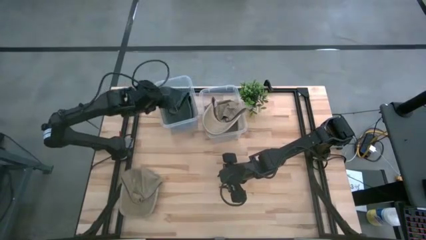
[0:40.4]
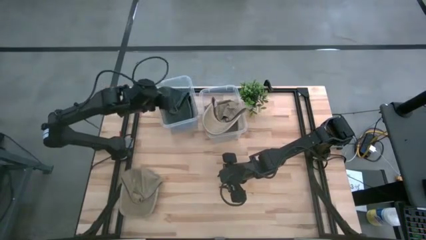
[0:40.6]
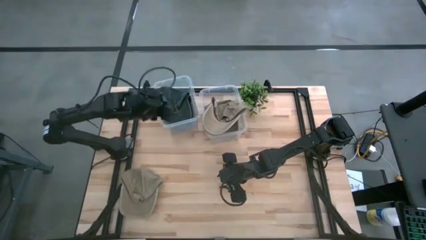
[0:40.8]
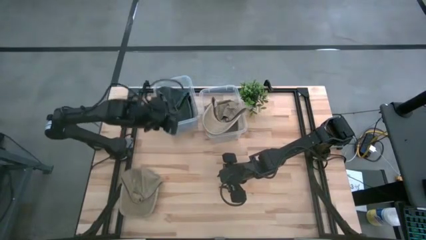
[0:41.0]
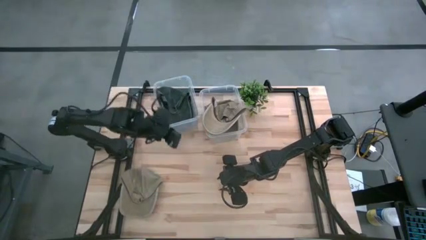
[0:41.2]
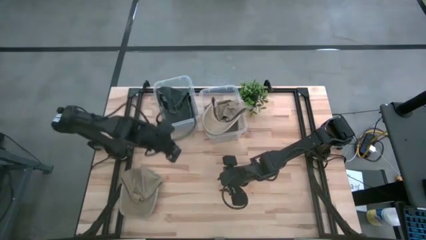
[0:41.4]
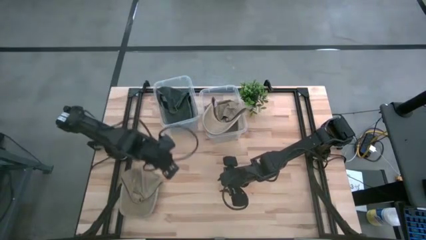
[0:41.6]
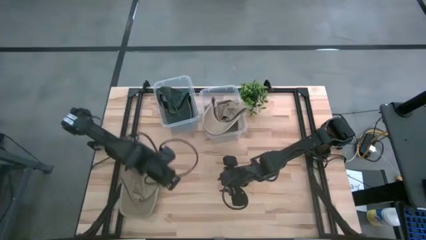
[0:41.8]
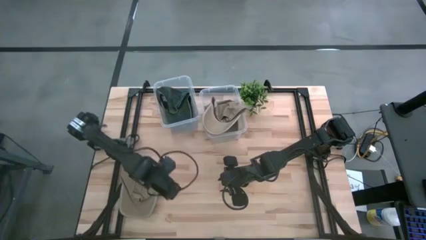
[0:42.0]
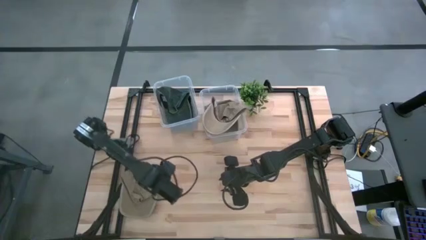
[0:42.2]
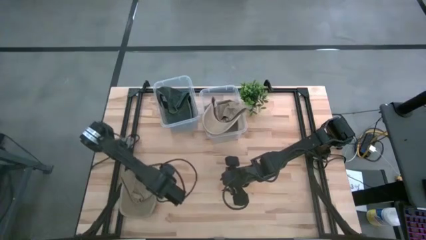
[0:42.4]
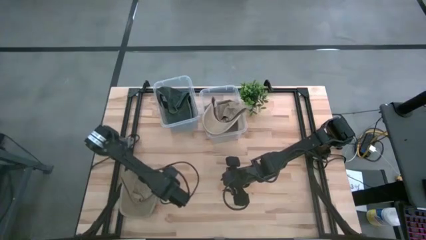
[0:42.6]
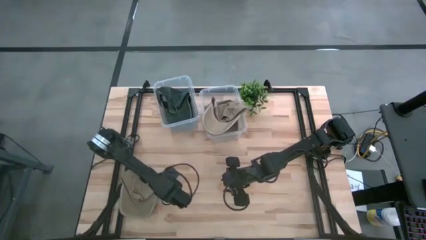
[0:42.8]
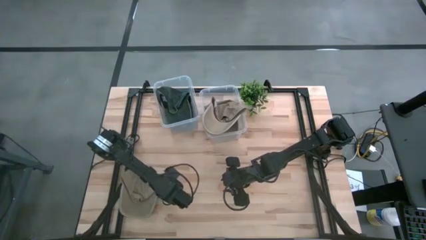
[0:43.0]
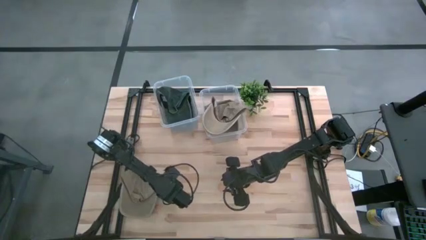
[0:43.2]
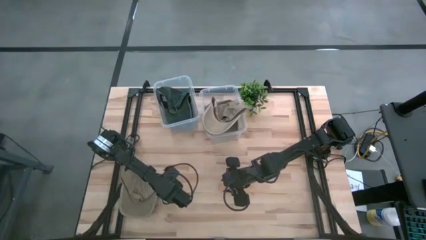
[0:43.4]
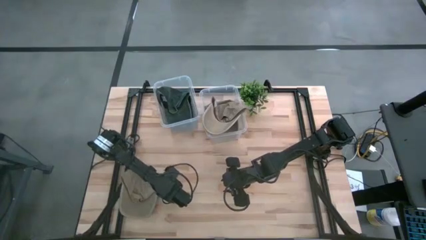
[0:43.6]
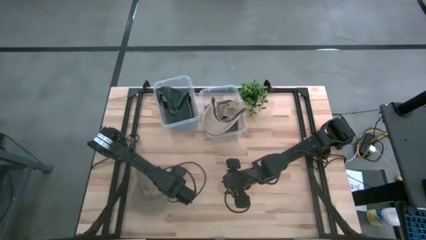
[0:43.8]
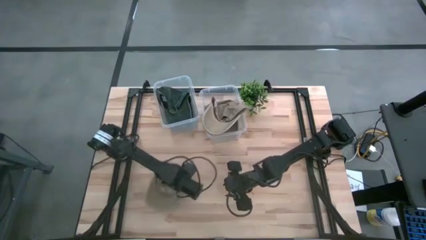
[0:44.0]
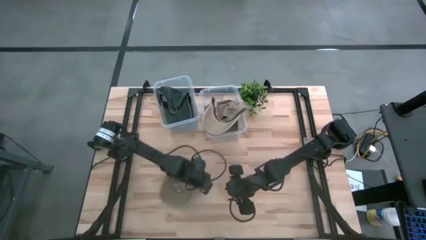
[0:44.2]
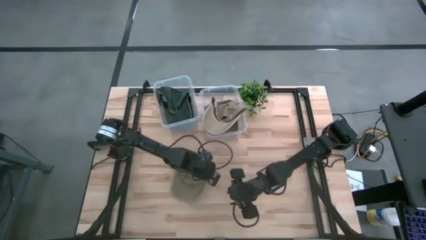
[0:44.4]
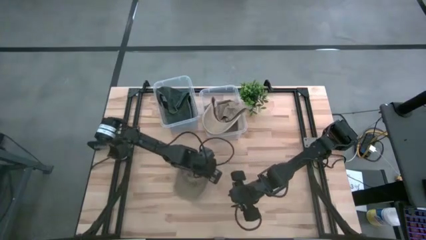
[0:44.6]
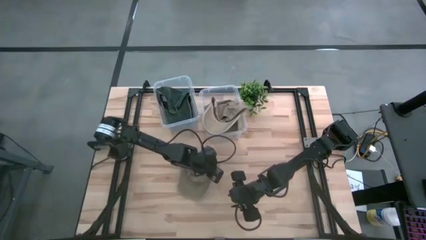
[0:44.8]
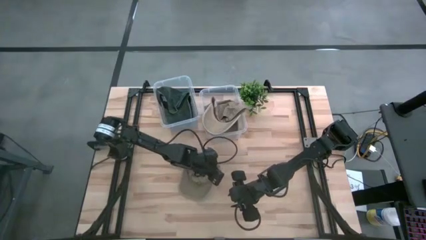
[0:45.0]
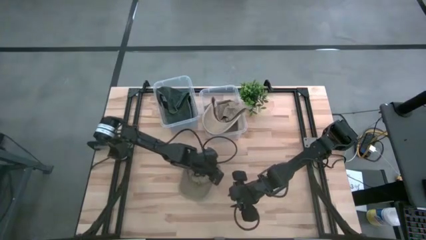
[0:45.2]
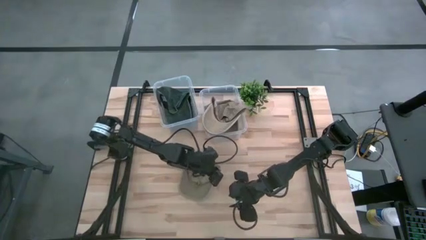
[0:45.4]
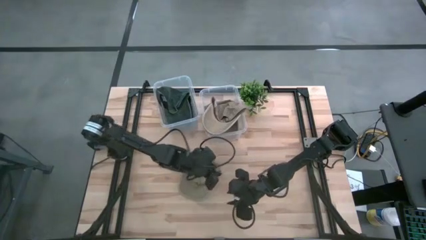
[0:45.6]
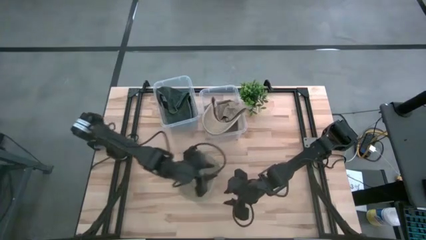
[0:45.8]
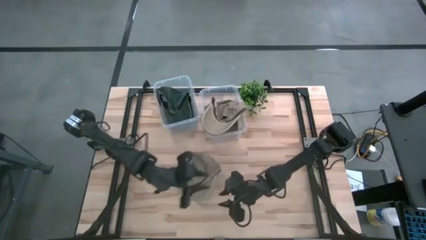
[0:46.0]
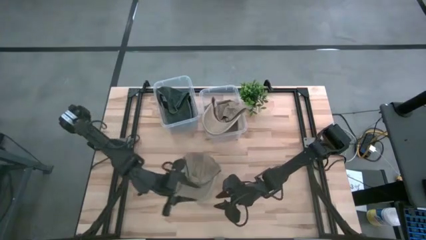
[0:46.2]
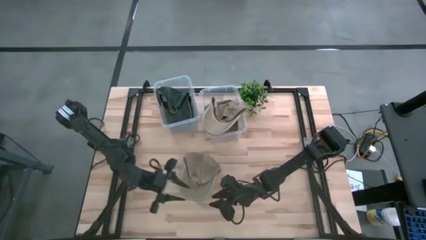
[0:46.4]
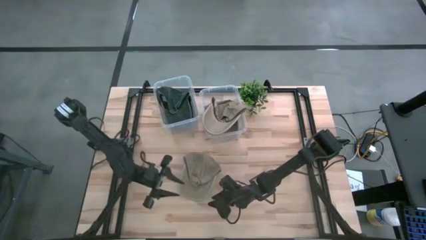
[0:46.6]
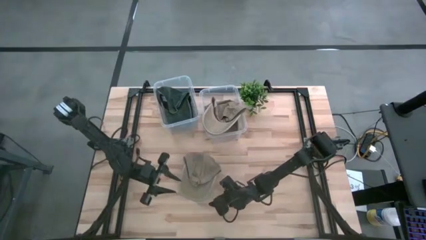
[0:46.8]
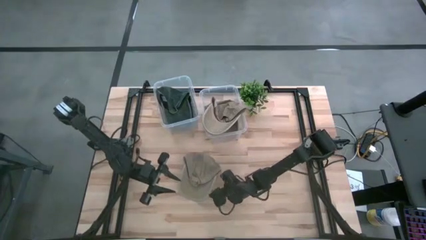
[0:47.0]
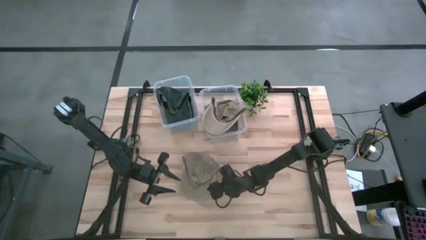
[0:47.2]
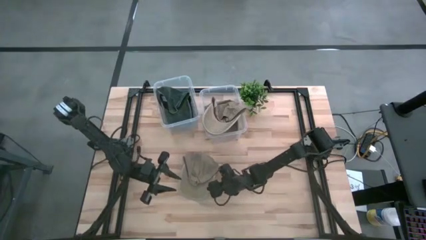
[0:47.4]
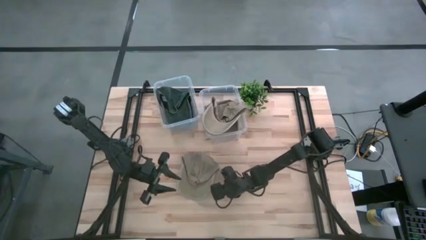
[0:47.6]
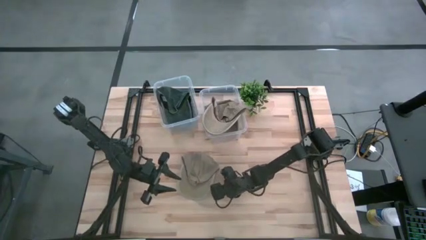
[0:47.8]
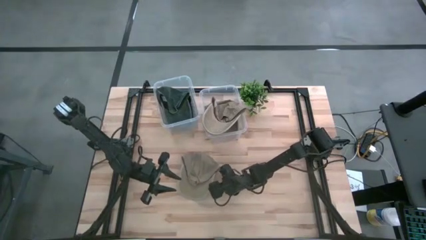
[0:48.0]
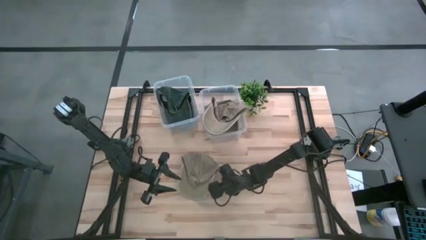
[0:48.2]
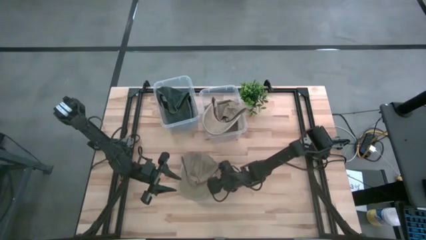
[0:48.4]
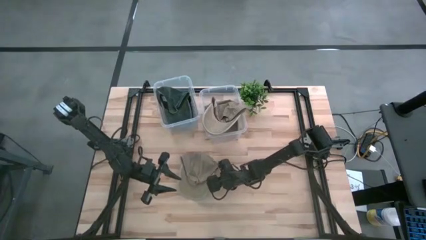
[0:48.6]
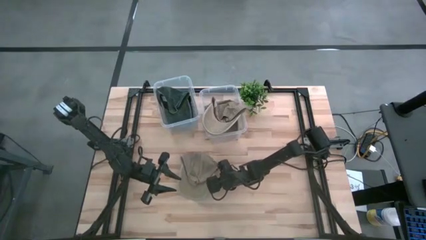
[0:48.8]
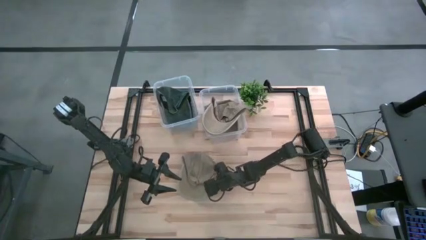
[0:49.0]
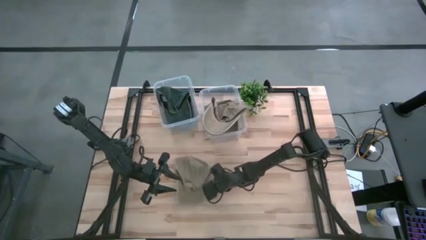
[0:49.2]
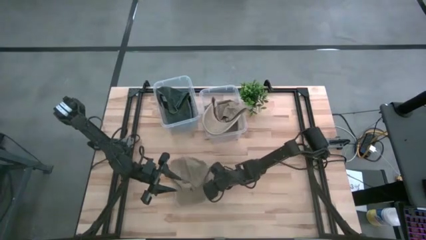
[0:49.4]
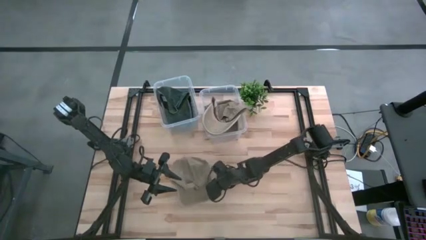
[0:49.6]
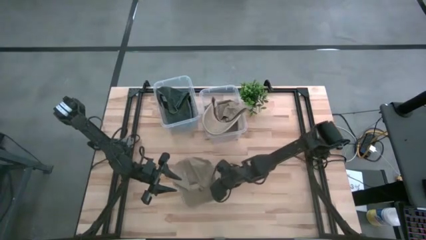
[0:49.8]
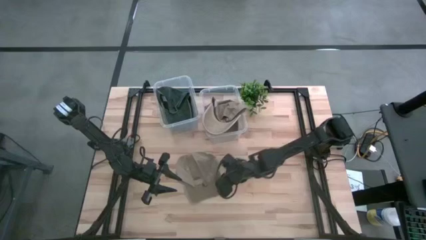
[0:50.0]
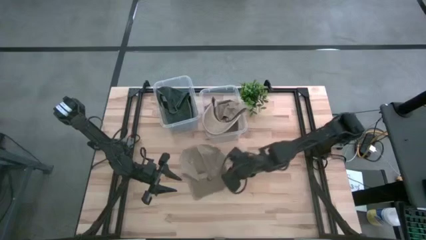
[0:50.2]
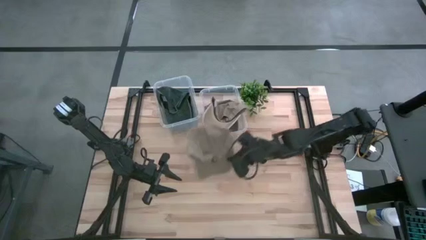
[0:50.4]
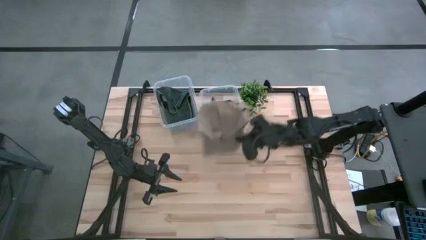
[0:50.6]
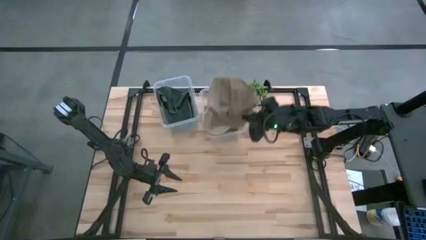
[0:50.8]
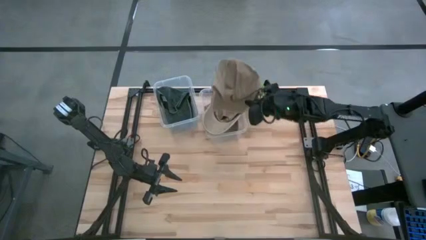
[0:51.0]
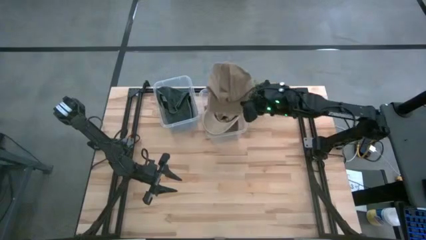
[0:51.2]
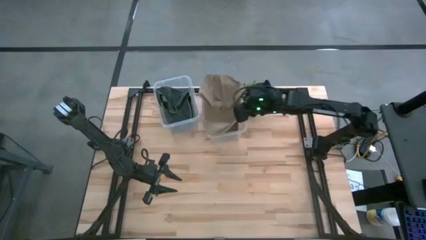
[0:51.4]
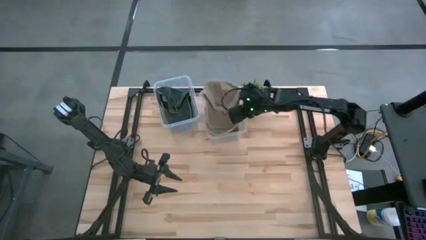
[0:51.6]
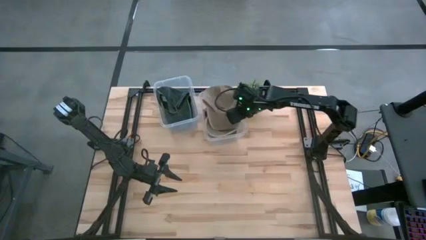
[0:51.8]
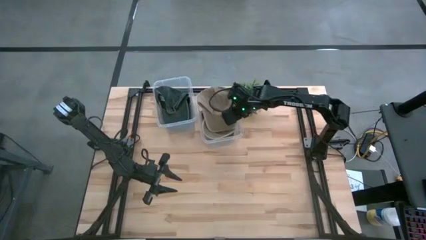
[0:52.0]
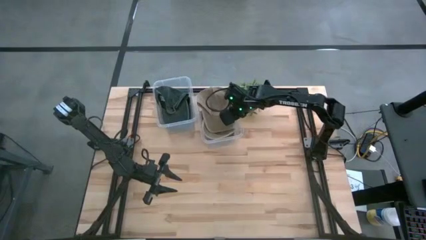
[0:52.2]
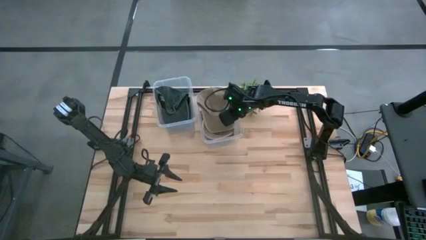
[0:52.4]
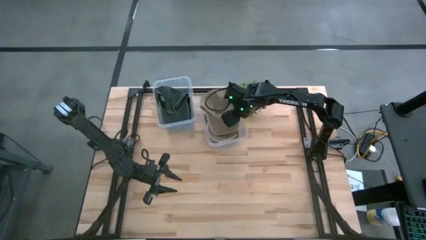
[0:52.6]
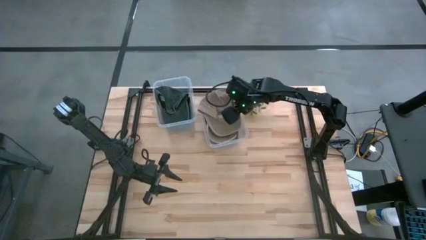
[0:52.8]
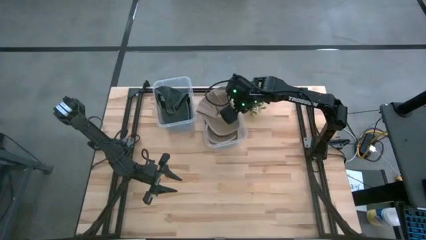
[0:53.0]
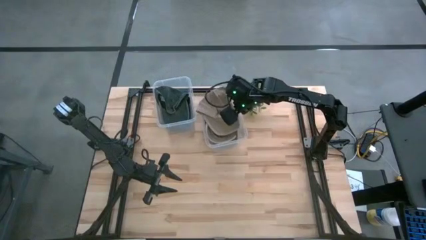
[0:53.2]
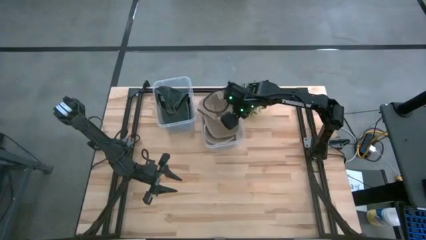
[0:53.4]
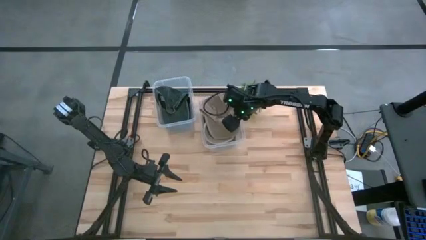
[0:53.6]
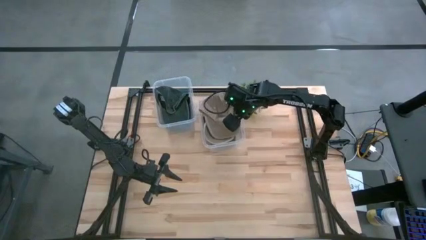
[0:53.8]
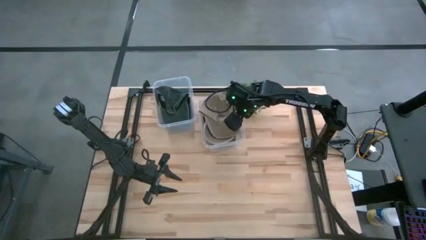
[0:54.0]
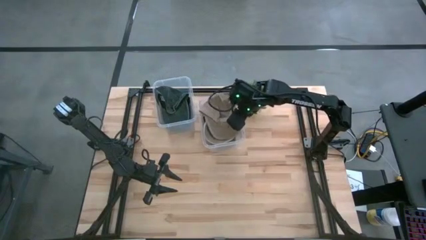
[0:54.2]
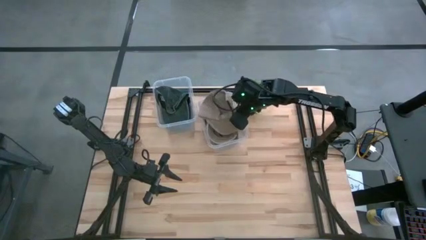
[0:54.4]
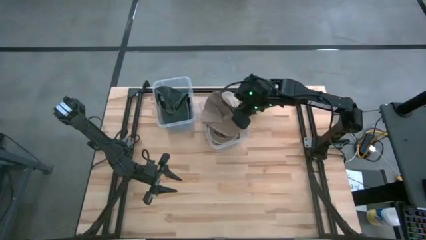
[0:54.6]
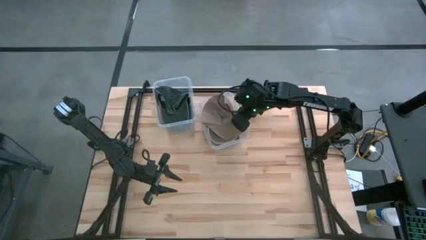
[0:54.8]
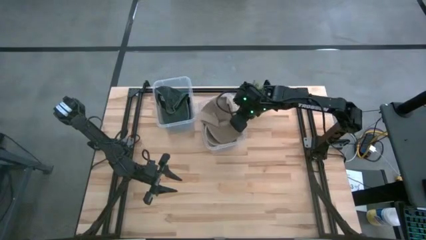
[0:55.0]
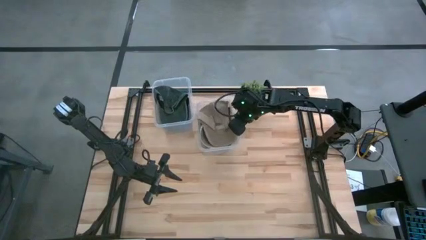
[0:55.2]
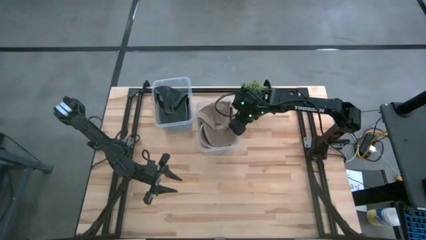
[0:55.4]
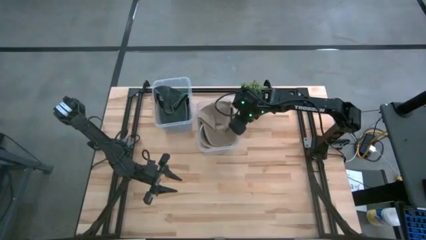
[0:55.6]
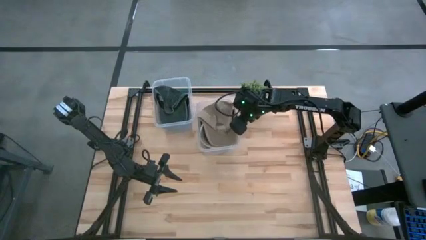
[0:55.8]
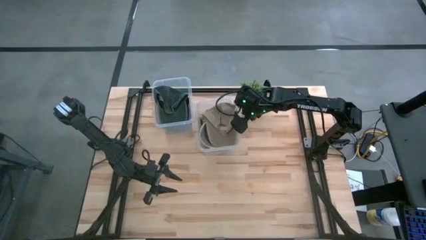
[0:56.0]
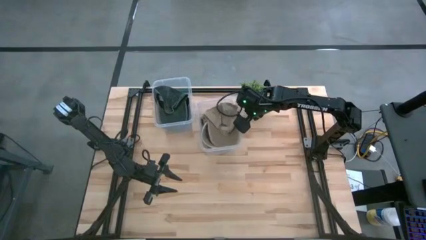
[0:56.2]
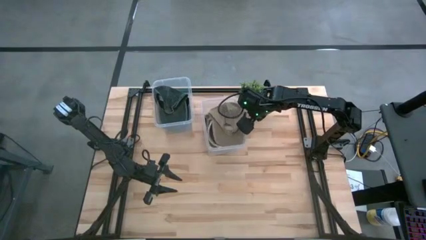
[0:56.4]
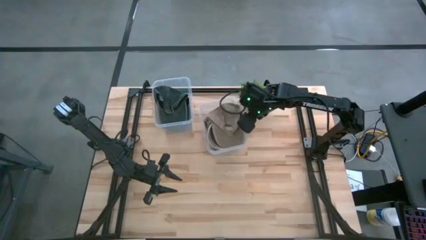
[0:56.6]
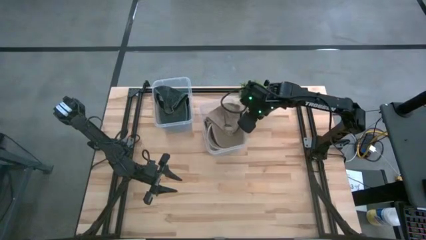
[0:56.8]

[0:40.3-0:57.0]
Task: Pick & Place hat
Put the brown cap into the right transparent bin
